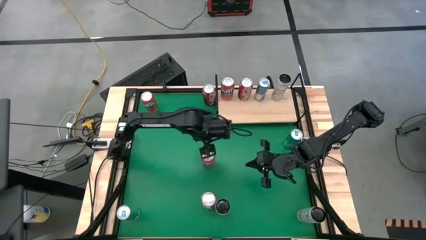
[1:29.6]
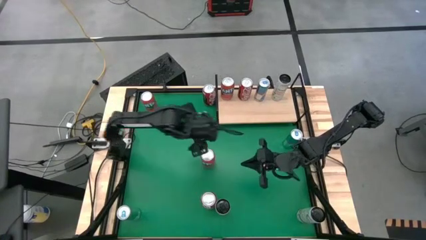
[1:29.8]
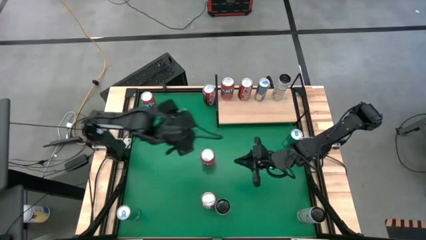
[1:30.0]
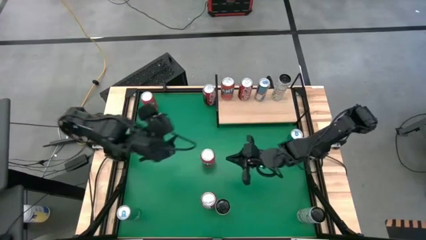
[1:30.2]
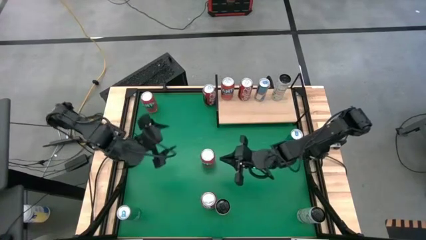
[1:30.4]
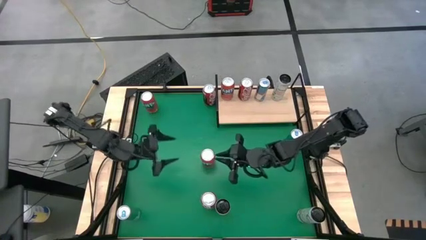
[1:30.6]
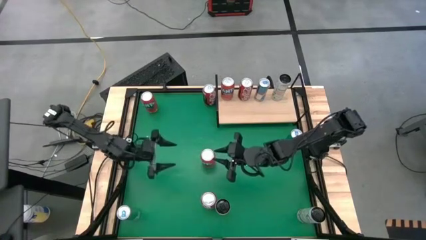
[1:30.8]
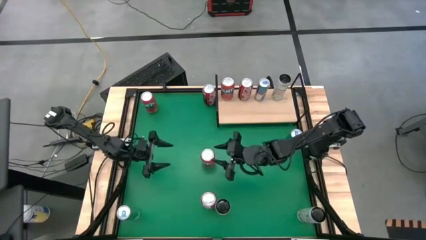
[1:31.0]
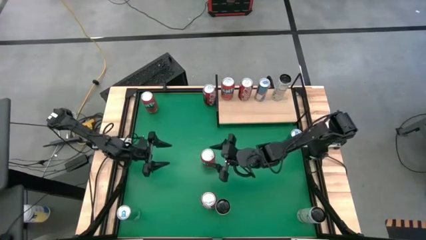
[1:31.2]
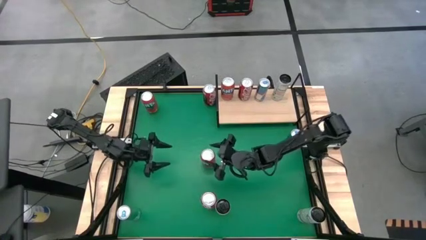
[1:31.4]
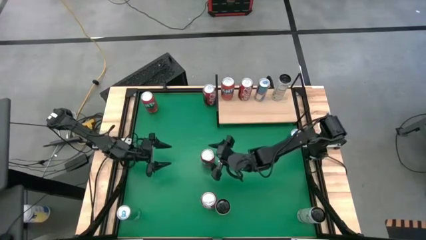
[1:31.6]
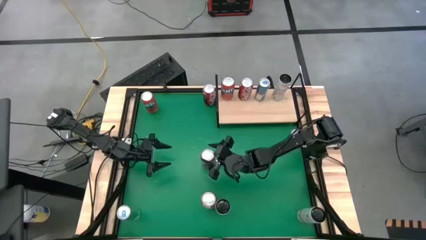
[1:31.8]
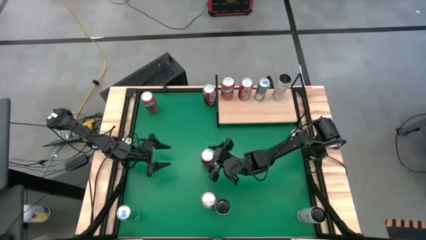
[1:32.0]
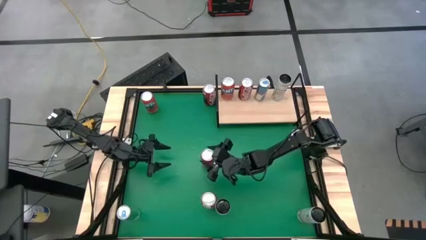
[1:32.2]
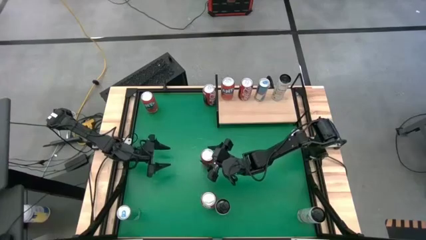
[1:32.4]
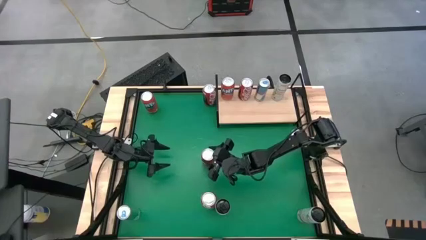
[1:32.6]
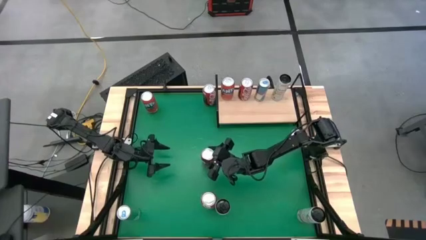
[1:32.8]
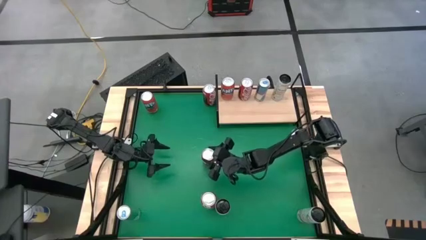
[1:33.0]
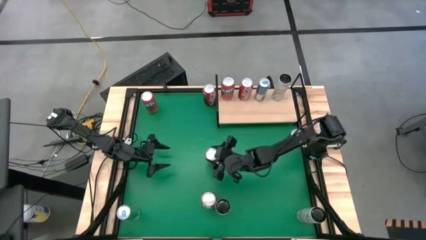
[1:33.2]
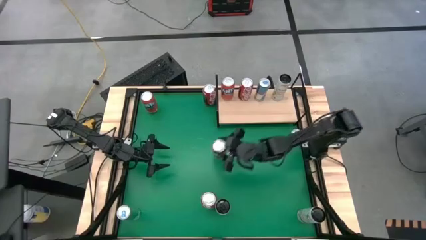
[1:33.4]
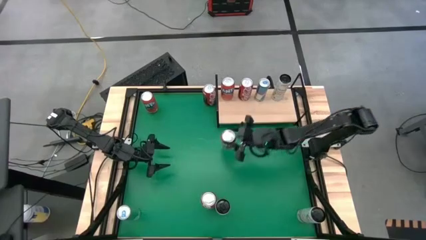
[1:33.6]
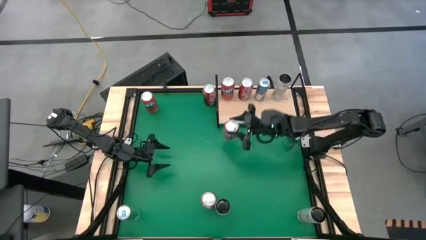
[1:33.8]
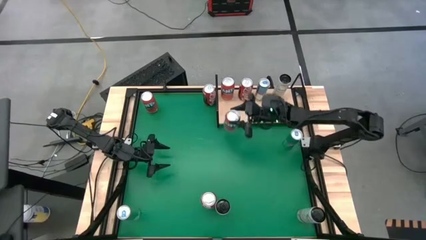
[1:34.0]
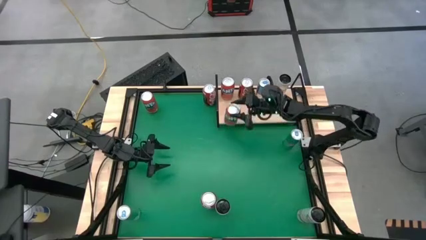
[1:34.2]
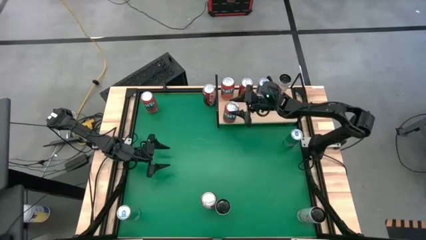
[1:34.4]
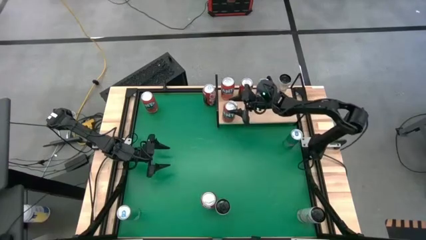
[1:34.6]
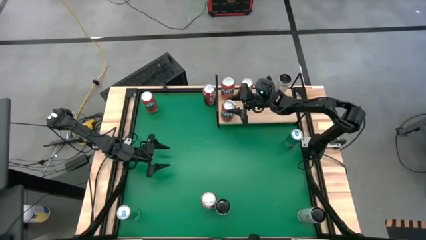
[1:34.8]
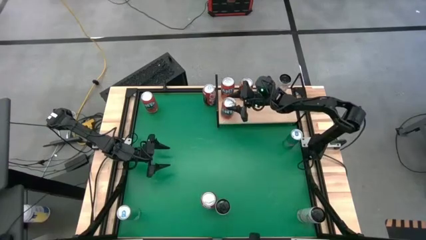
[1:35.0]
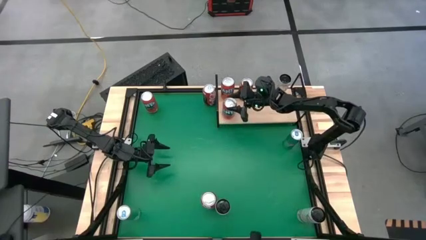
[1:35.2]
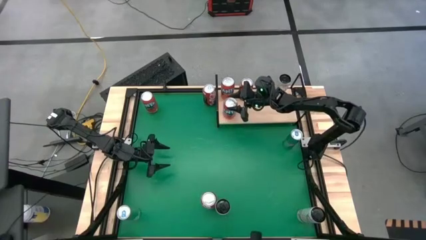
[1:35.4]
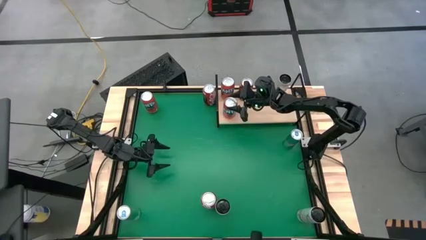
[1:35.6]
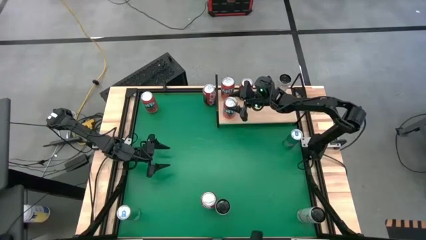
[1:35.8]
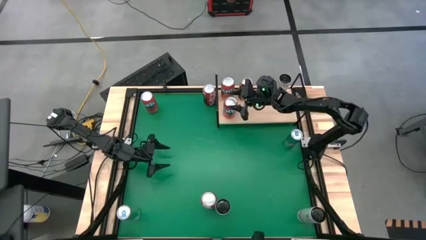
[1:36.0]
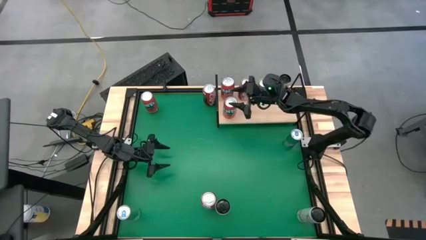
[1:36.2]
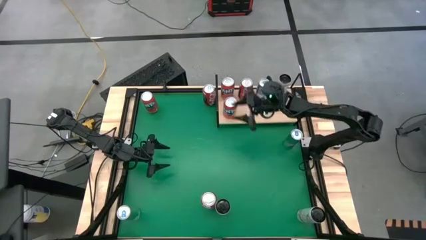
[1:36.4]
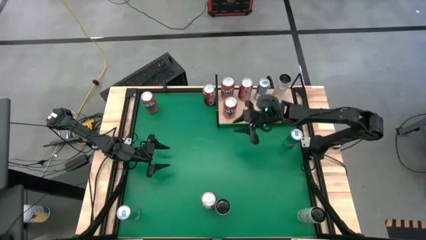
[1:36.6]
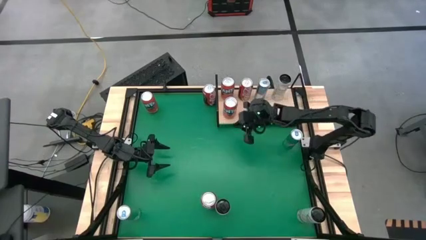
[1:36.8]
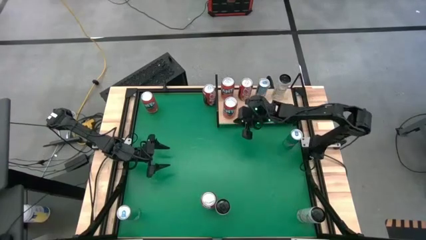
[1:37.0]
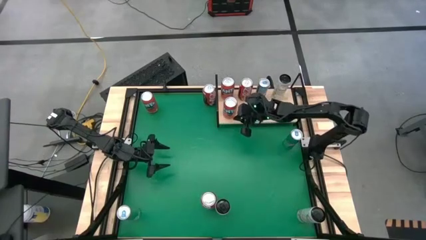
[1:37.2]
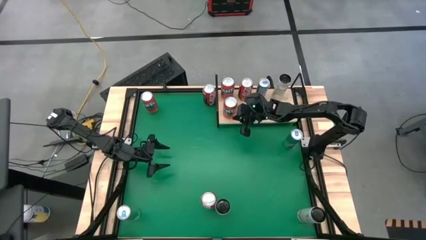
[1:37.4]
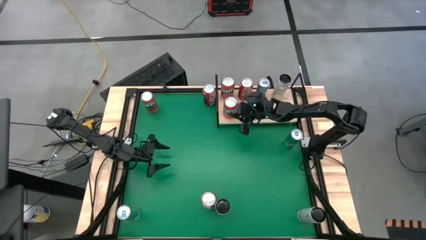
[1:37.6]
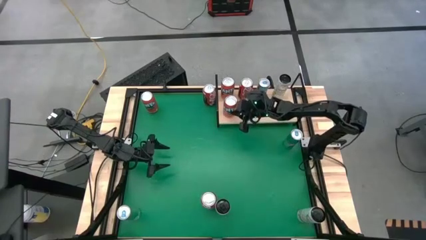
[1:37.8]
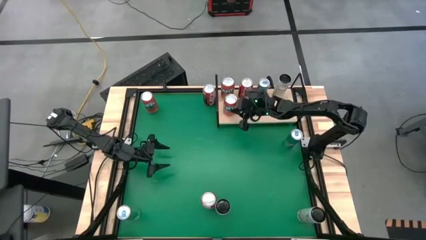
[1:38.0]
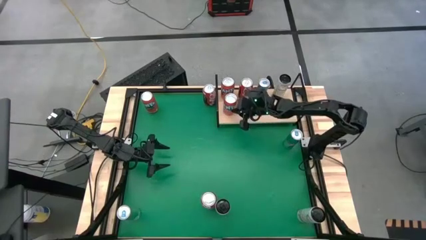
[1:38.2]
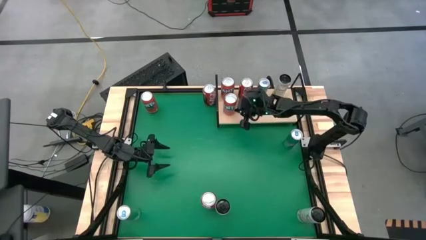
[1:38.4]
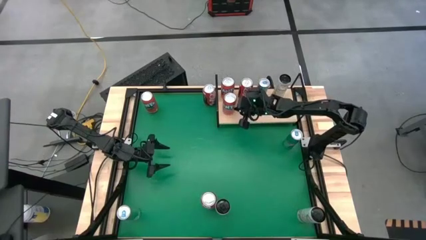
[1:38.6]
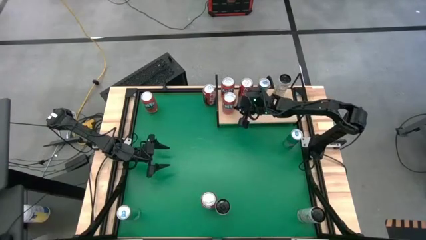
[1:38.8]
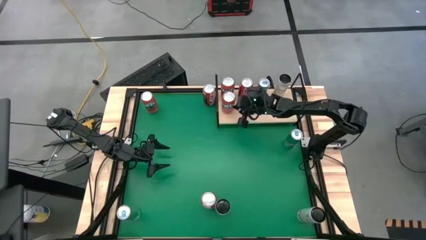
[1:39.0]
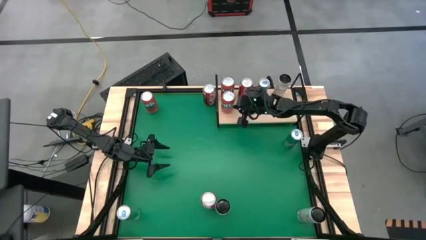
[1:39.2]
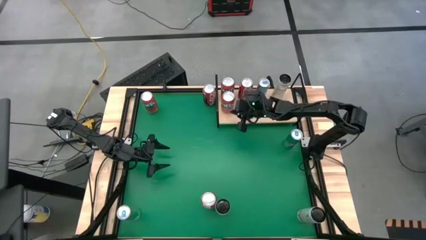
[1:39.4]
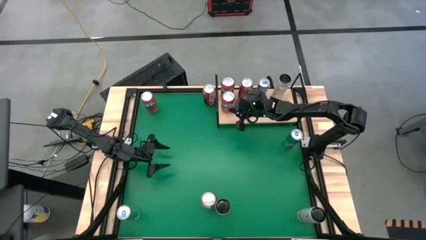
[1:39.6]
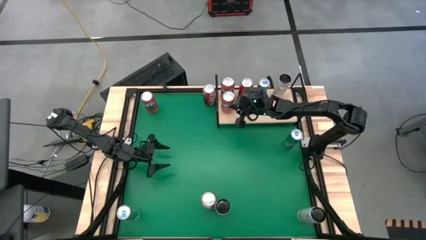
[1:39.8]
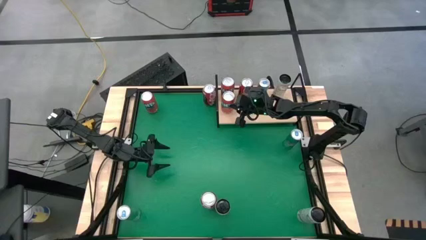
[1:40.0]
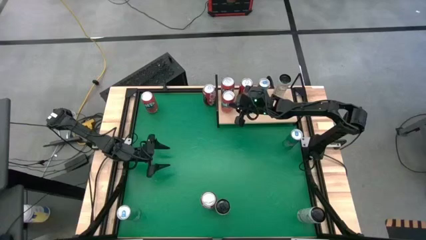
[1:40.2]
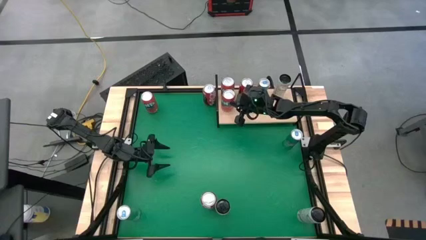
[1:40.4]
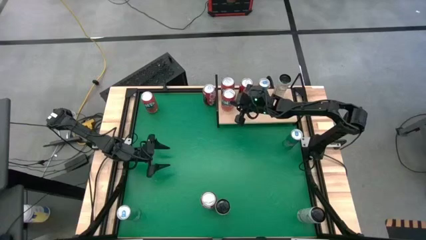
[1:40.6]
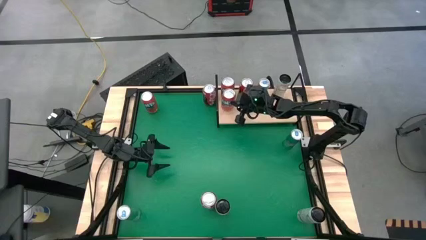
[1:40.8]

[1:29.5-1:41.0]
Task: Place canned beverage on shelf
Put the bottom red soda can on the shelf aligned with the other red soda can
